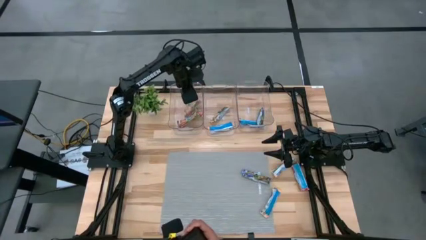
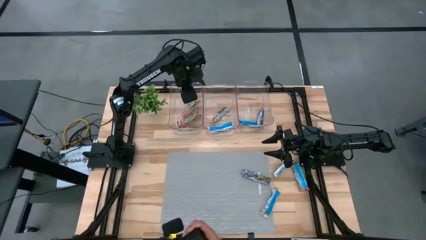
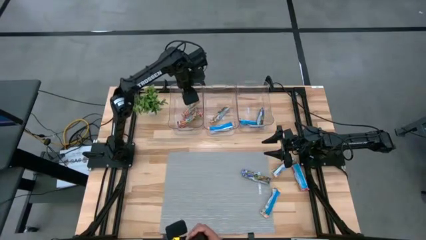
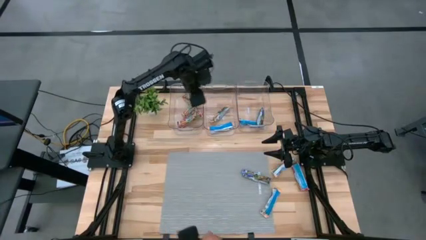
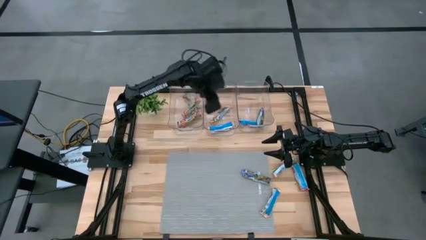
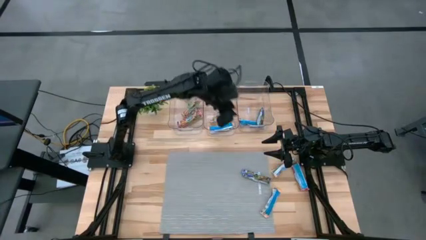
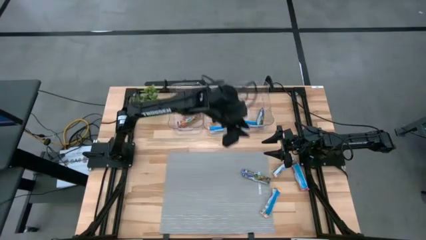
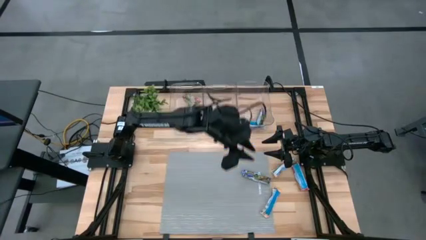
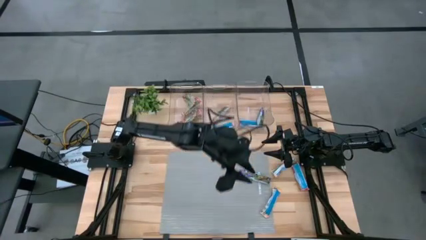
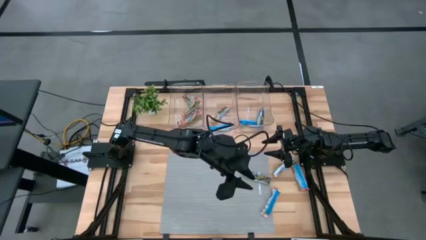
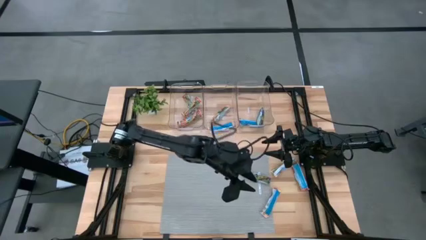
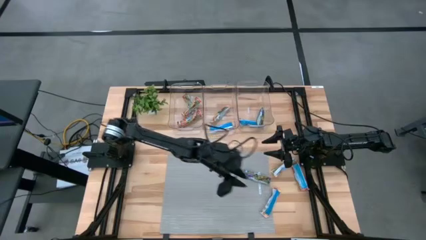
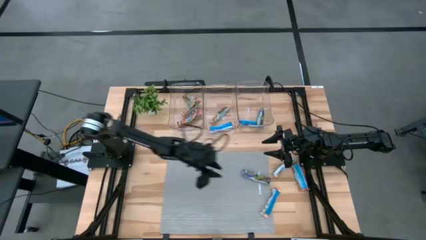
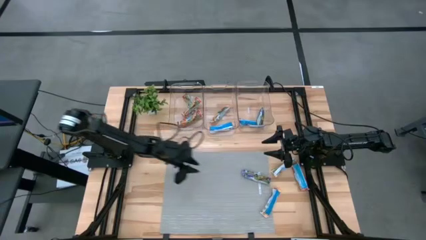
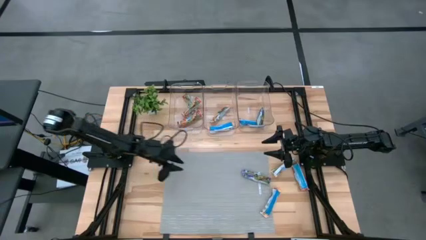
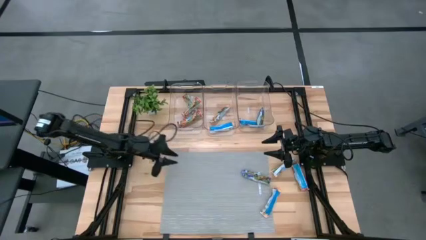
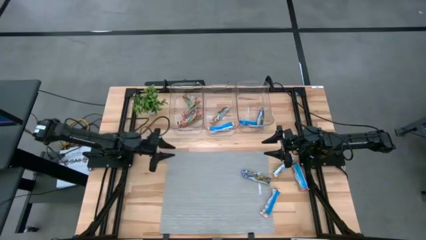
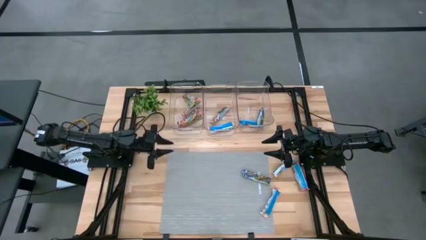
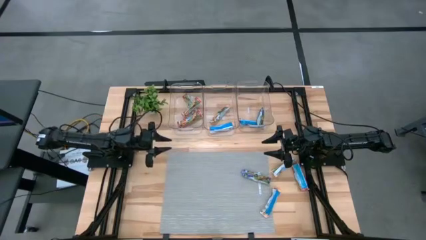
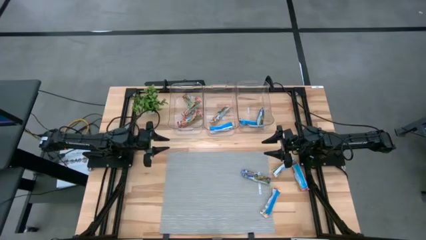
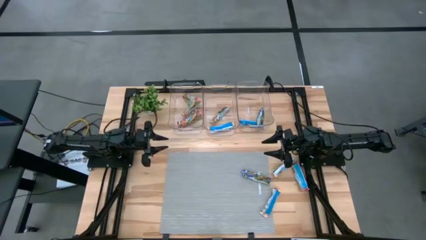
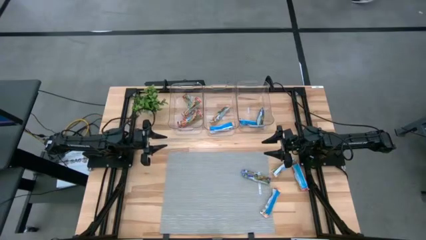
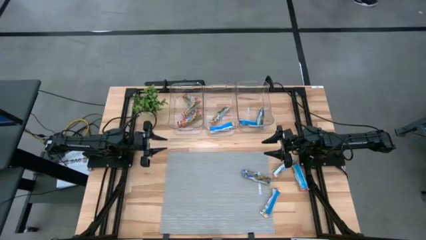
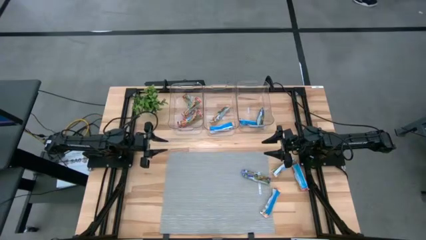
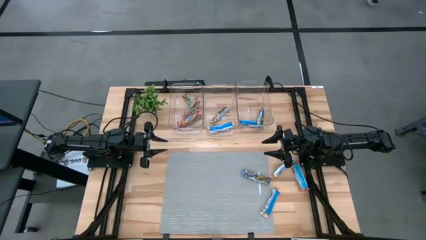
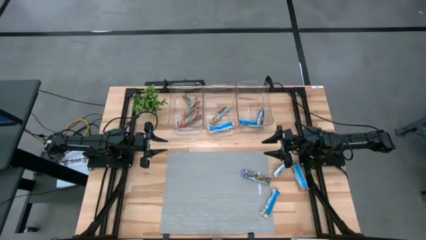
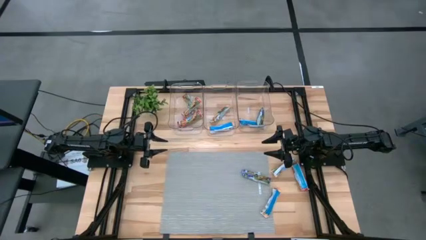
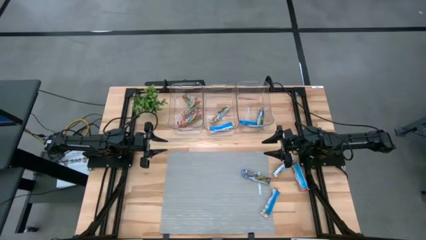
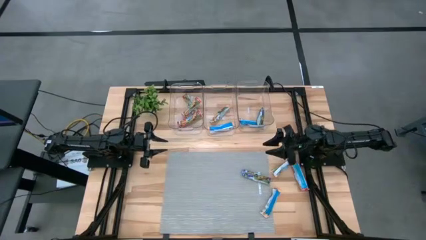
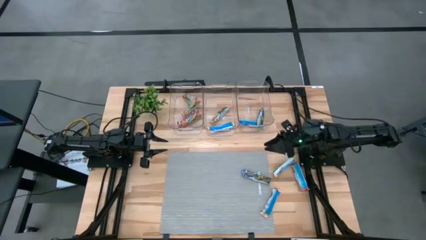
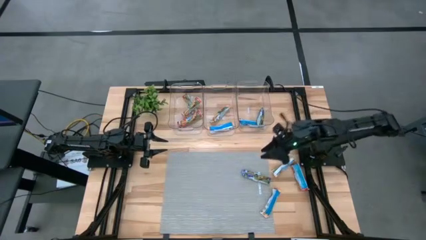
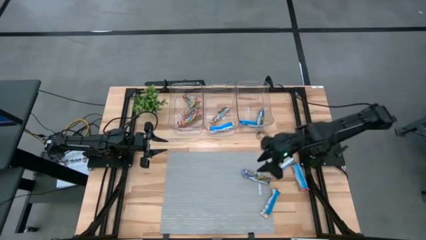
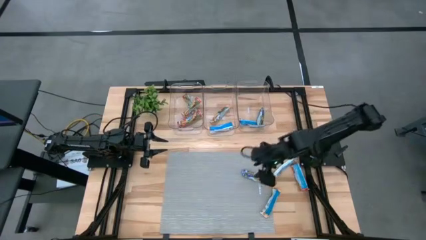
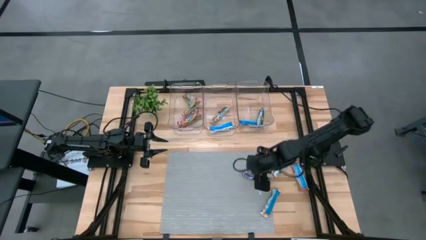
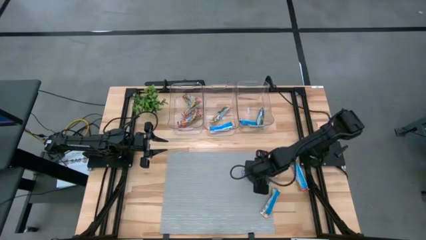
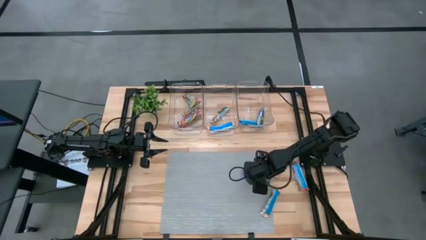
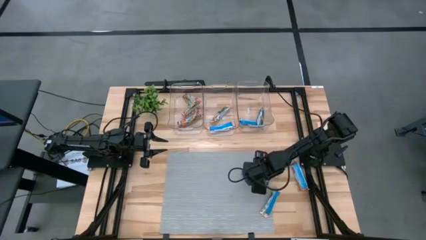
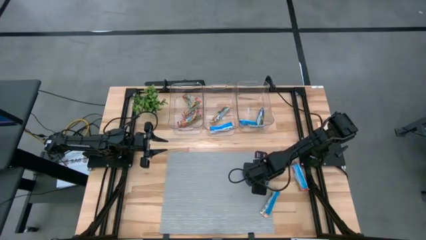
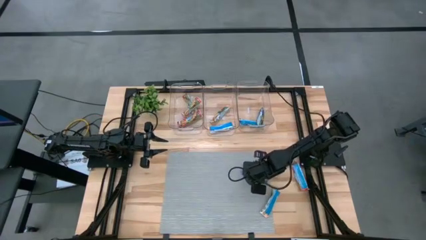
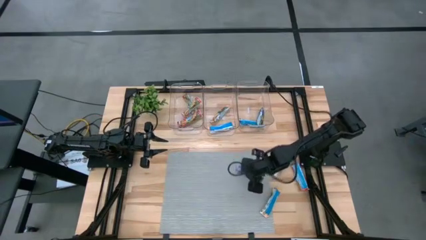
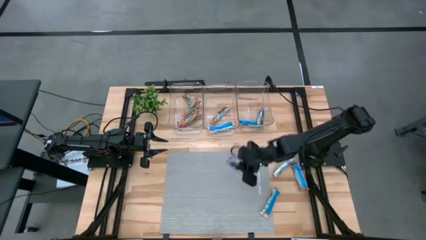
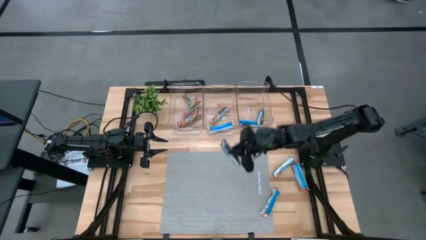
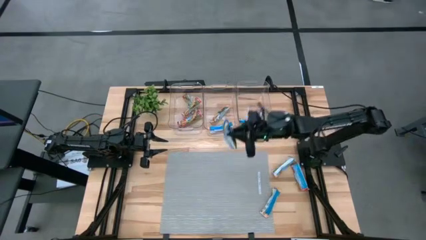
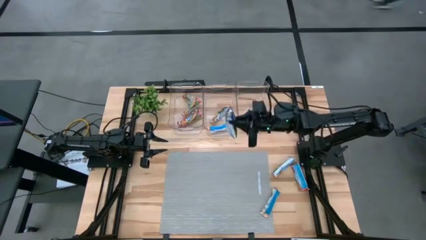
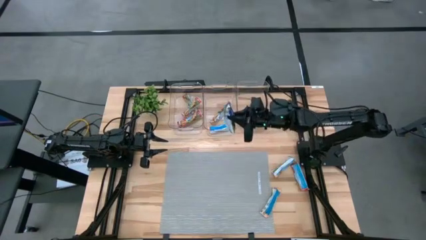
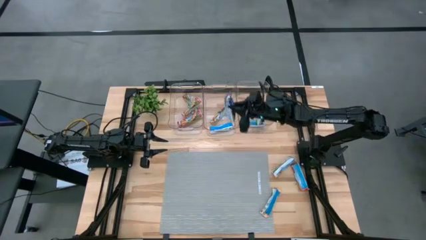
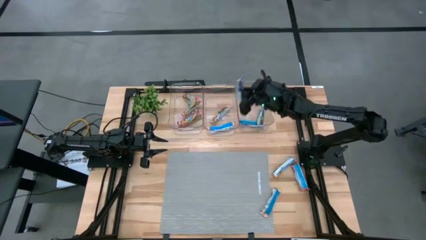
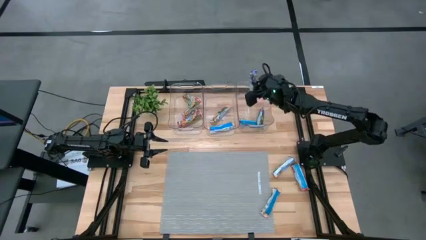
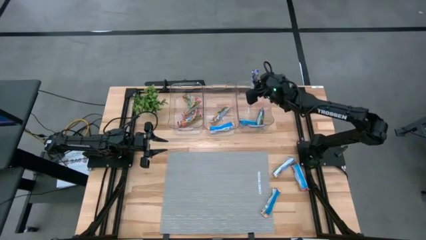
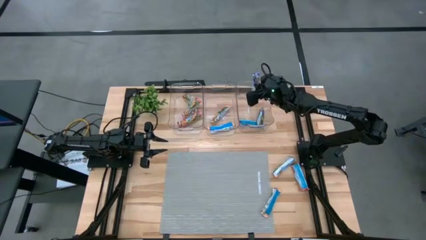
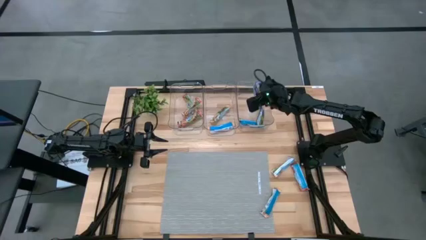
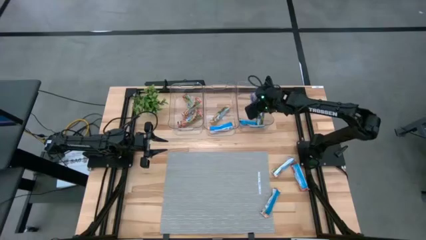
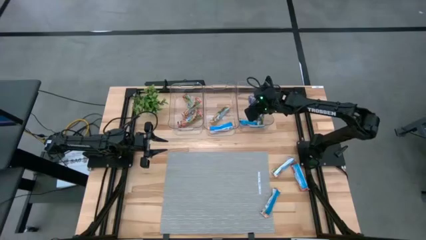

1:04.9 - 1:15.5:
Task: Pick and place Granola Bars by type
Put the blue granola bar into the right transparent bin

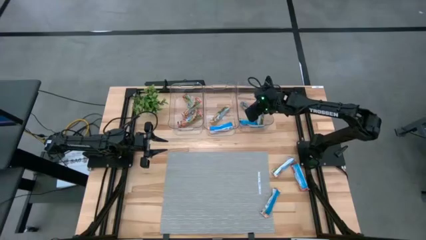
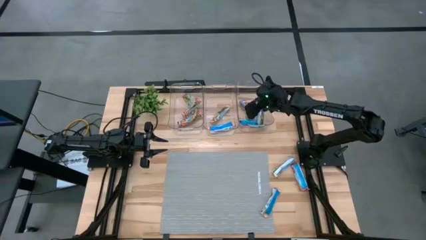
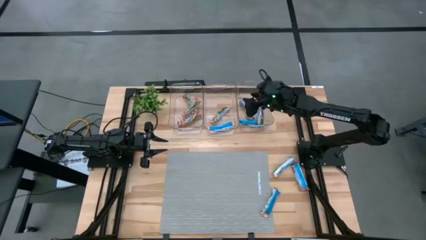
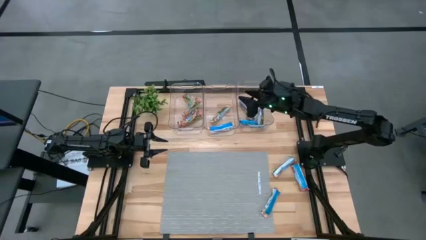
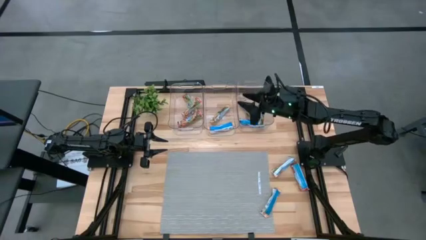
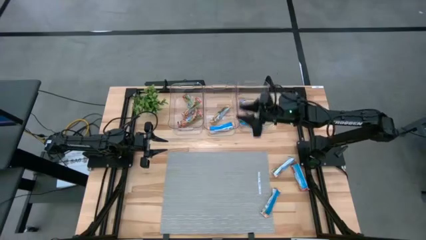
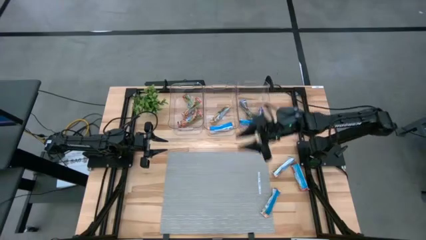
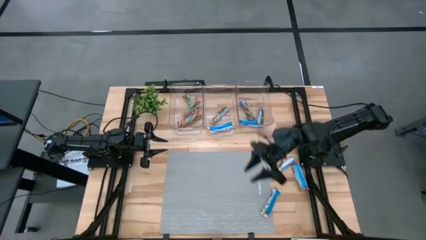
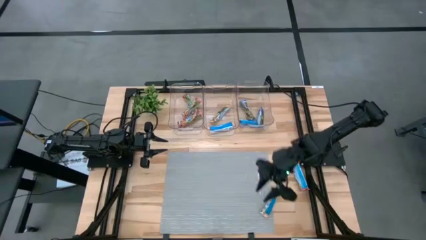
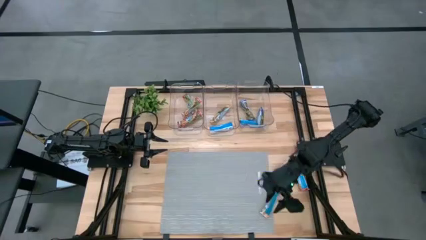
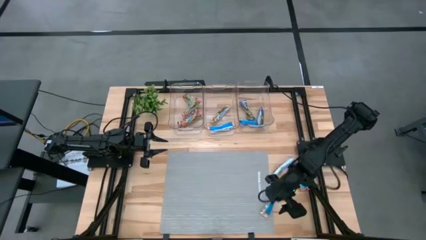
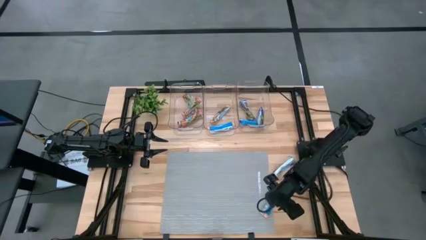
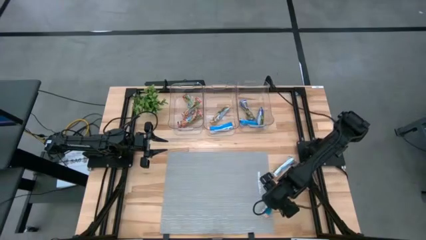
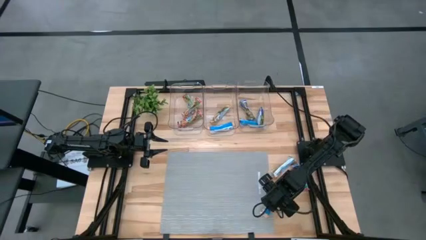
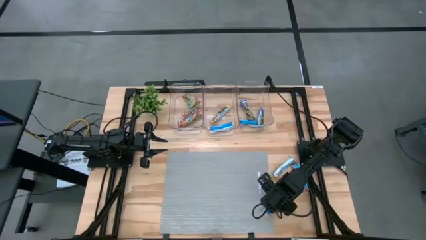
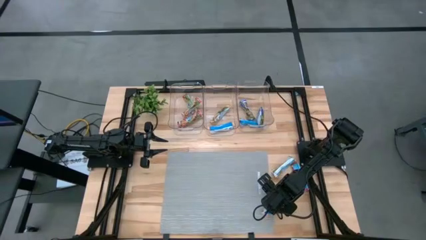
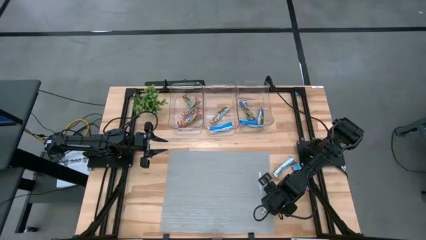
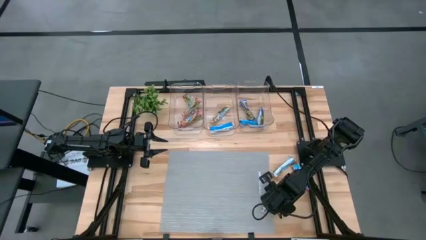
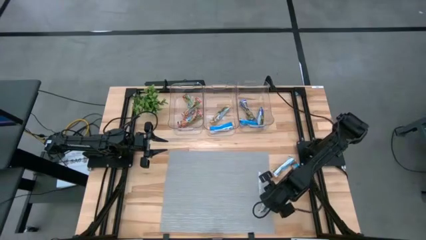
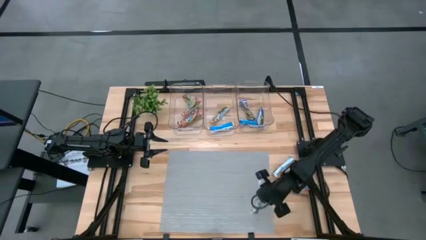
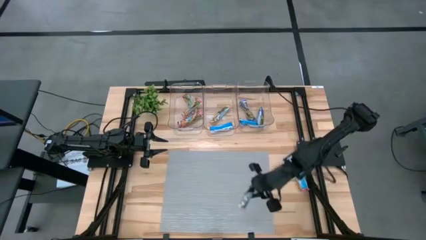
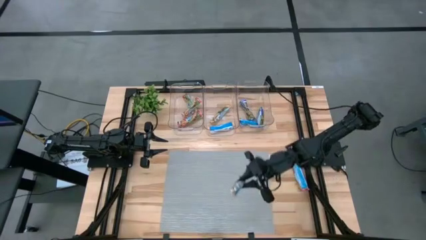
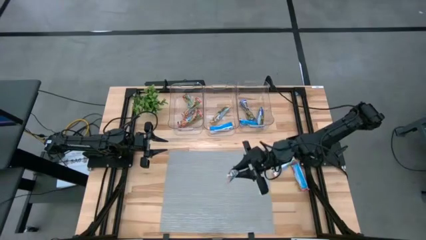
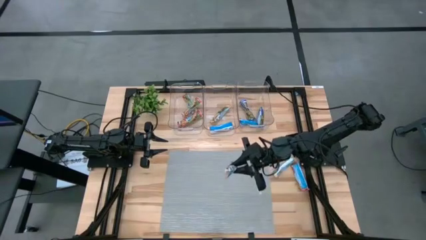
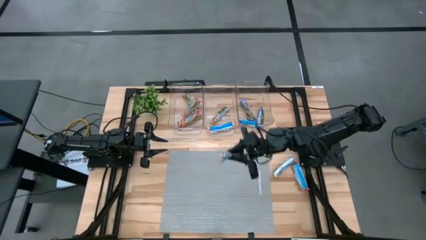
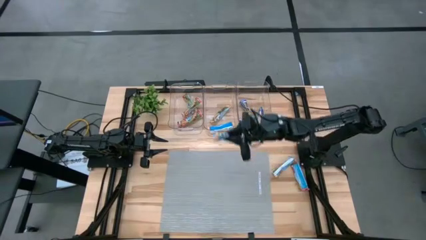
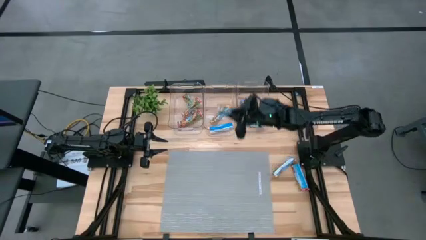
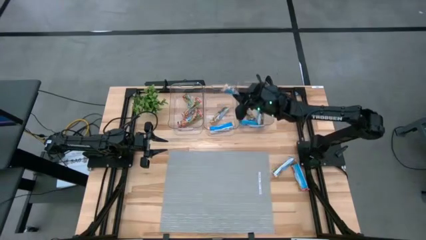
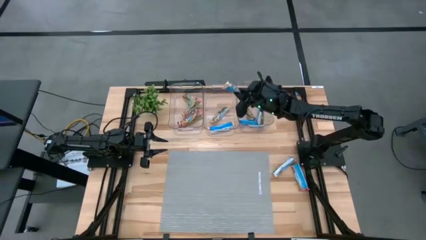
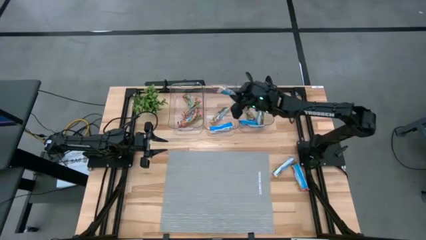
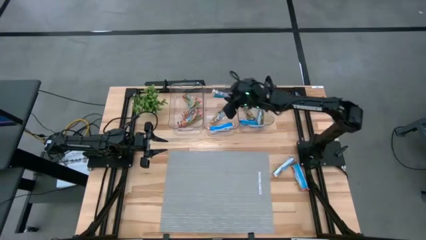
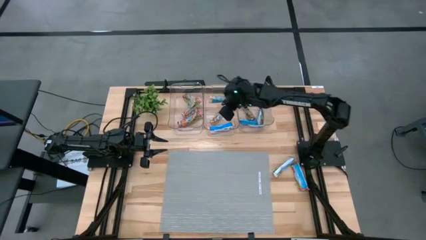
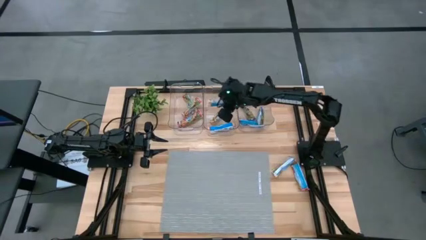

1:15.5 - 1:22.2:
Put the yellow granola bar into the middle transparent bin
